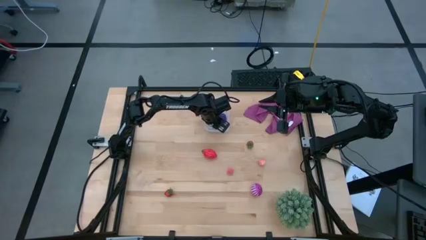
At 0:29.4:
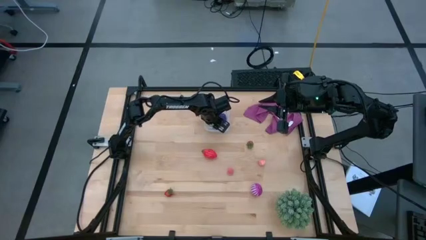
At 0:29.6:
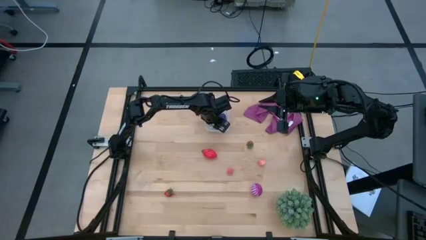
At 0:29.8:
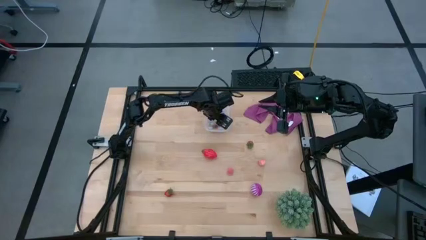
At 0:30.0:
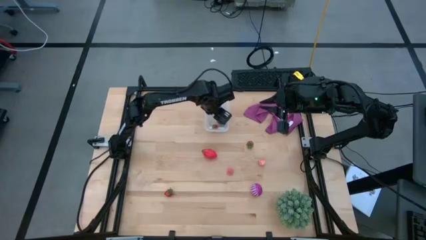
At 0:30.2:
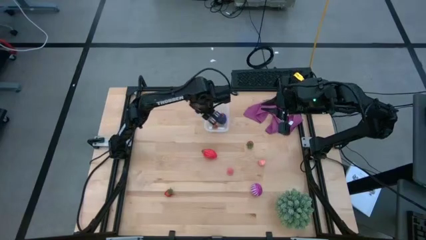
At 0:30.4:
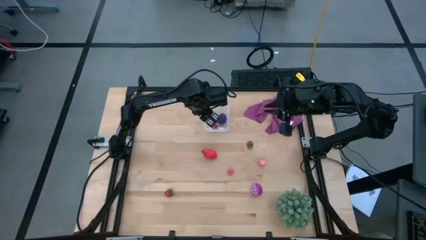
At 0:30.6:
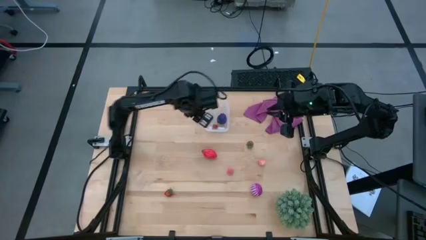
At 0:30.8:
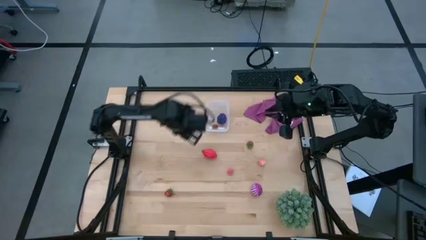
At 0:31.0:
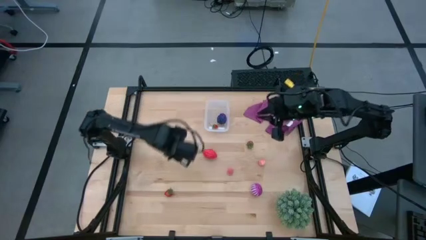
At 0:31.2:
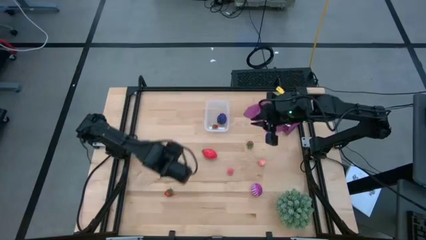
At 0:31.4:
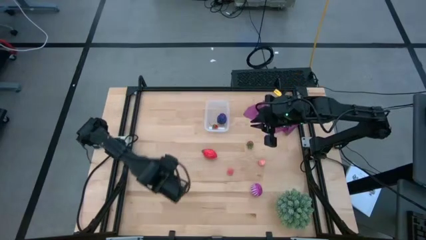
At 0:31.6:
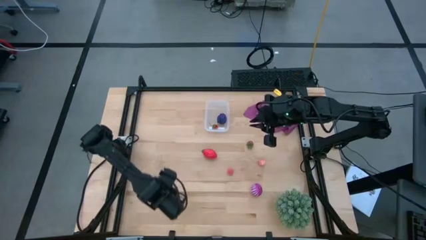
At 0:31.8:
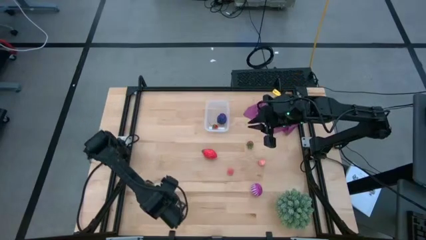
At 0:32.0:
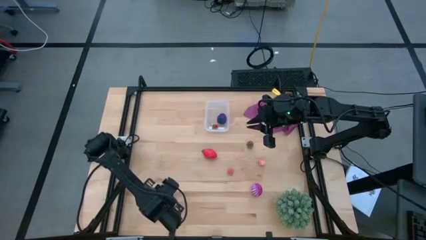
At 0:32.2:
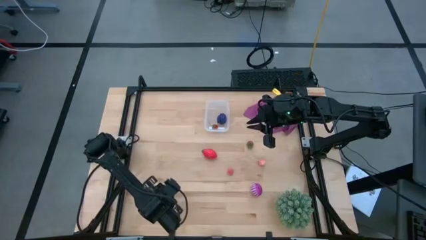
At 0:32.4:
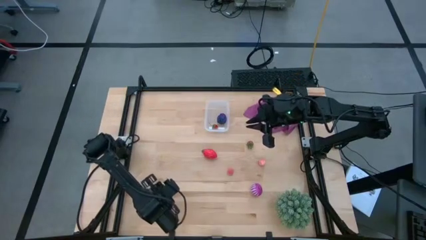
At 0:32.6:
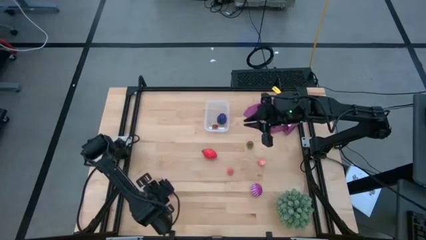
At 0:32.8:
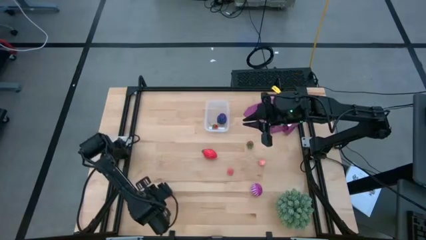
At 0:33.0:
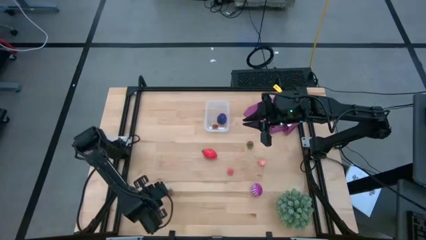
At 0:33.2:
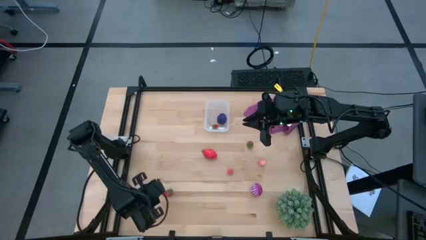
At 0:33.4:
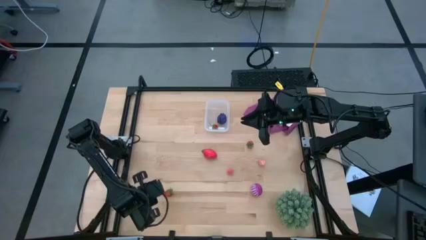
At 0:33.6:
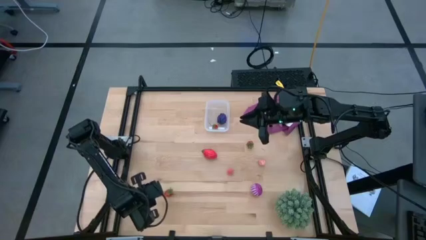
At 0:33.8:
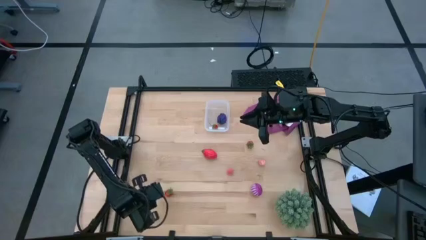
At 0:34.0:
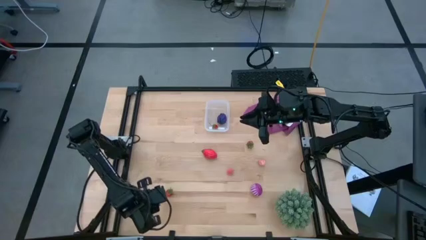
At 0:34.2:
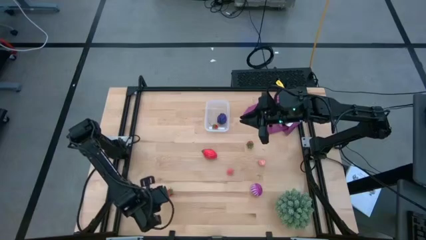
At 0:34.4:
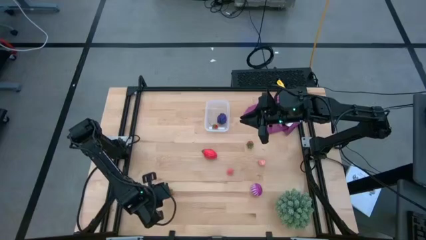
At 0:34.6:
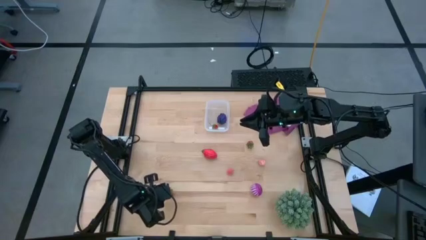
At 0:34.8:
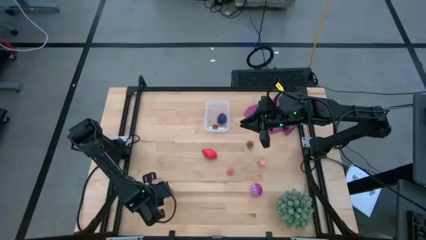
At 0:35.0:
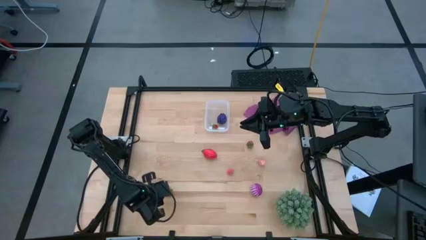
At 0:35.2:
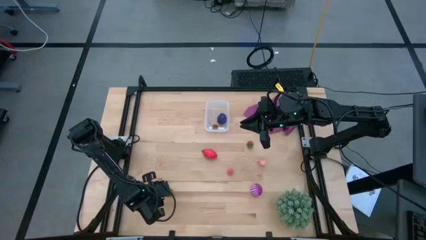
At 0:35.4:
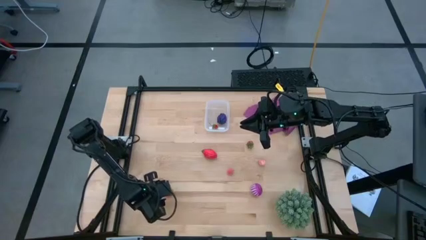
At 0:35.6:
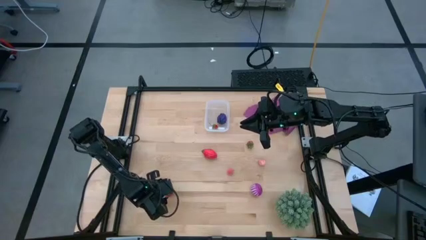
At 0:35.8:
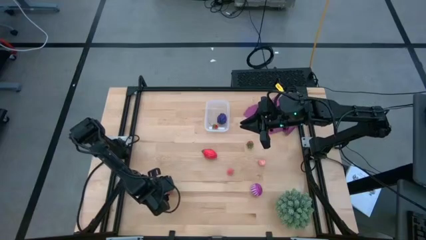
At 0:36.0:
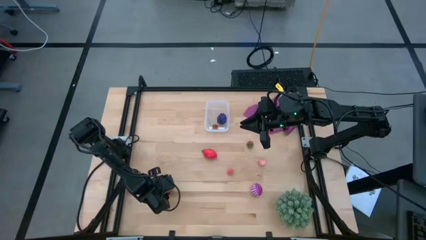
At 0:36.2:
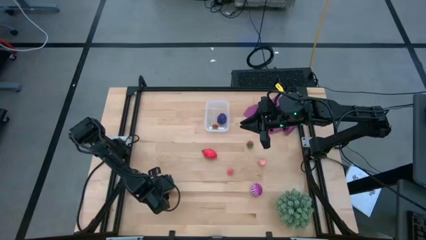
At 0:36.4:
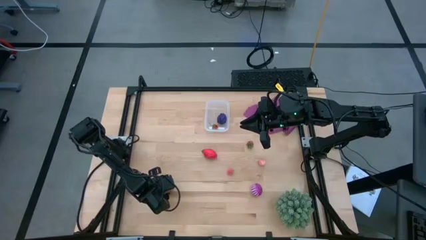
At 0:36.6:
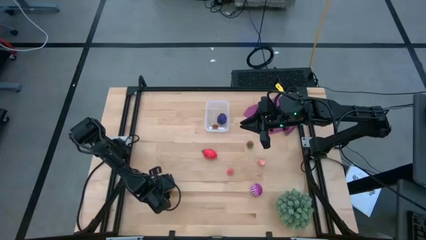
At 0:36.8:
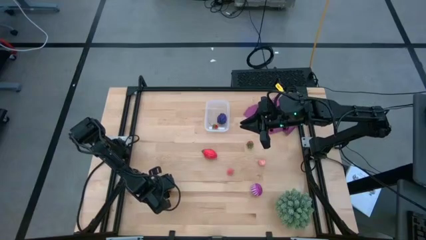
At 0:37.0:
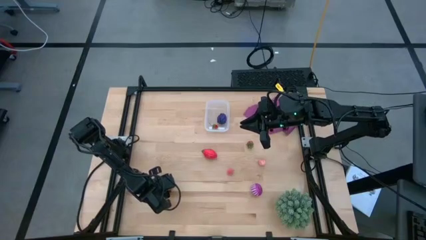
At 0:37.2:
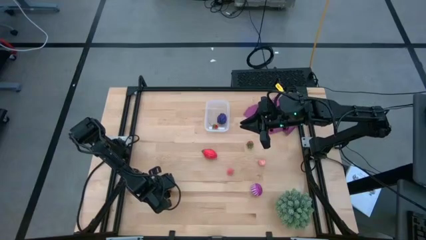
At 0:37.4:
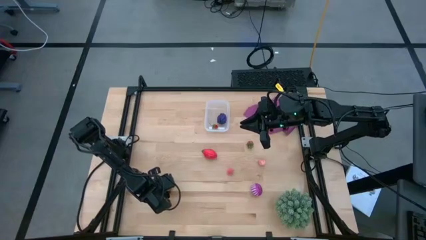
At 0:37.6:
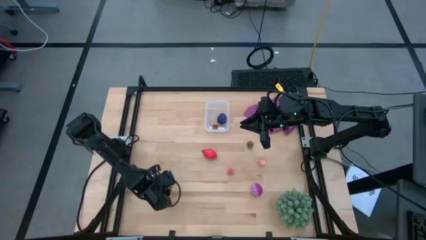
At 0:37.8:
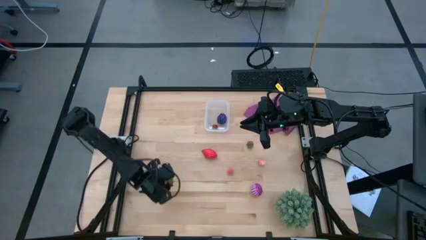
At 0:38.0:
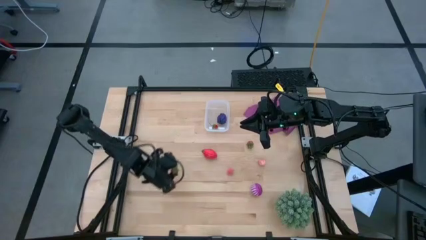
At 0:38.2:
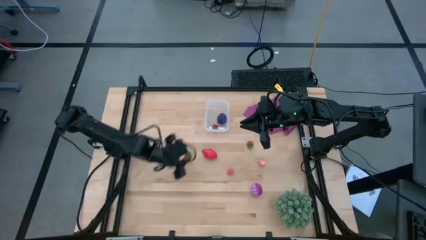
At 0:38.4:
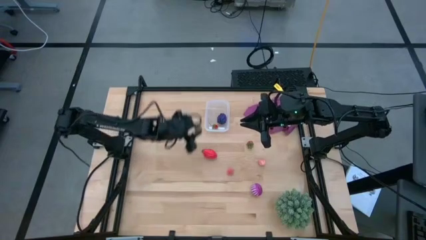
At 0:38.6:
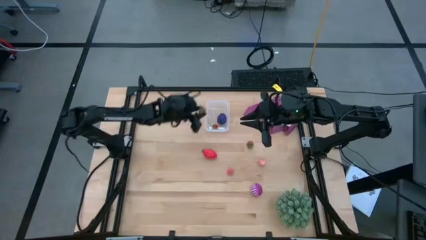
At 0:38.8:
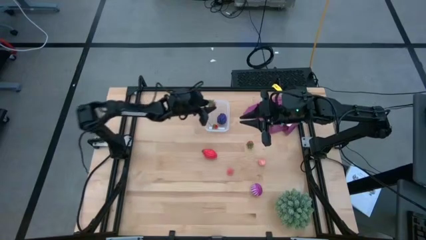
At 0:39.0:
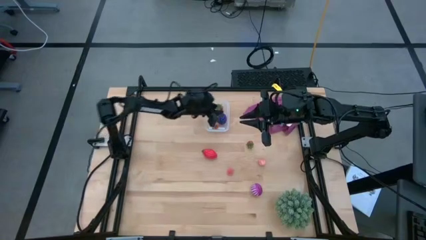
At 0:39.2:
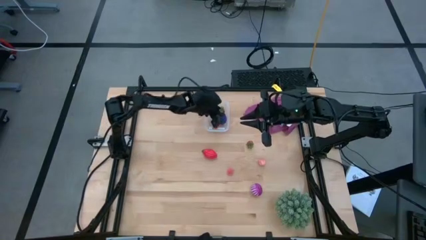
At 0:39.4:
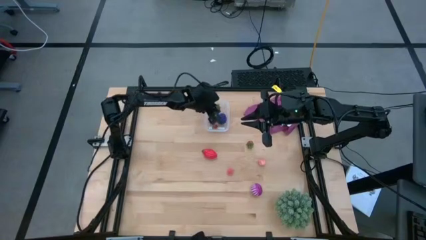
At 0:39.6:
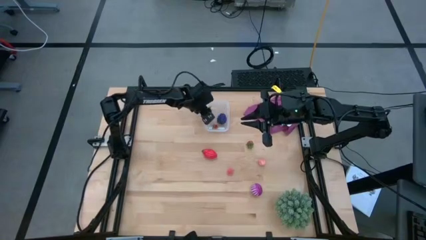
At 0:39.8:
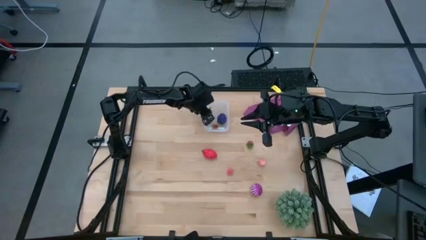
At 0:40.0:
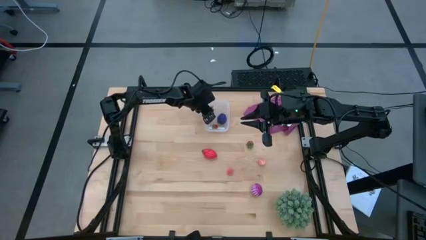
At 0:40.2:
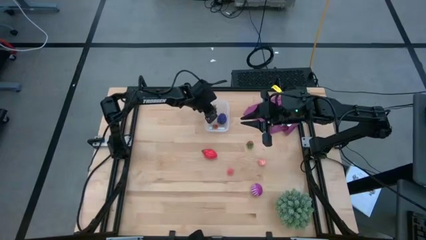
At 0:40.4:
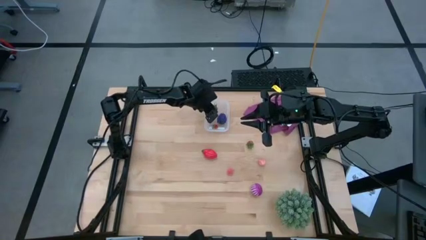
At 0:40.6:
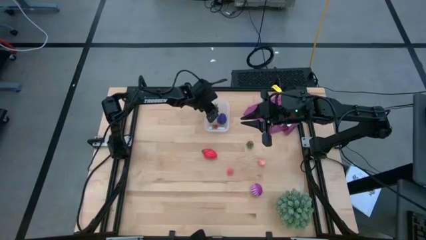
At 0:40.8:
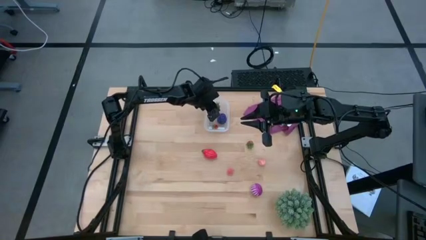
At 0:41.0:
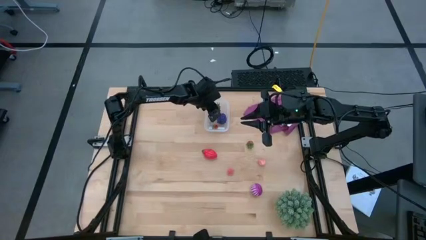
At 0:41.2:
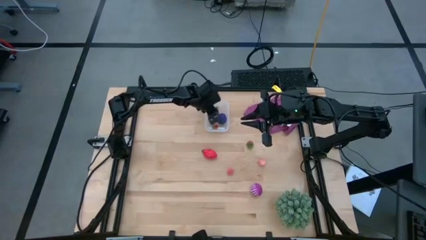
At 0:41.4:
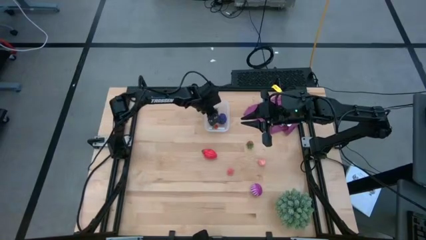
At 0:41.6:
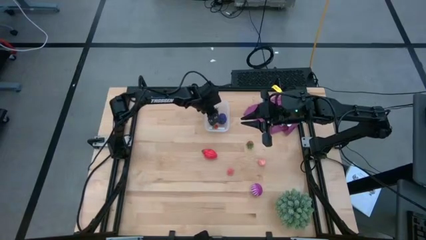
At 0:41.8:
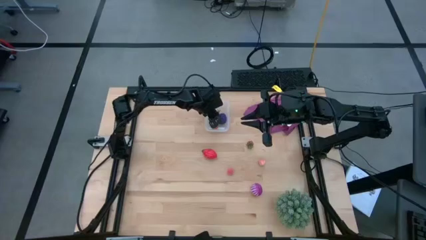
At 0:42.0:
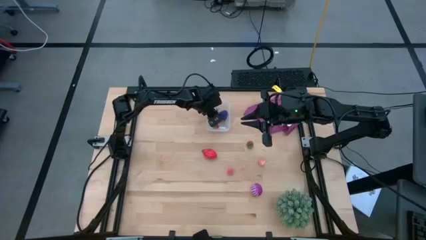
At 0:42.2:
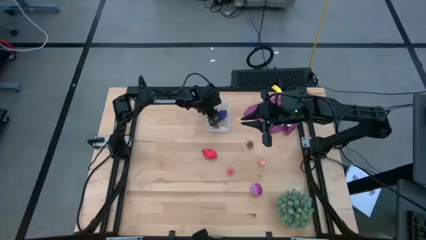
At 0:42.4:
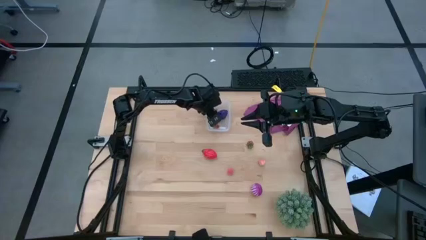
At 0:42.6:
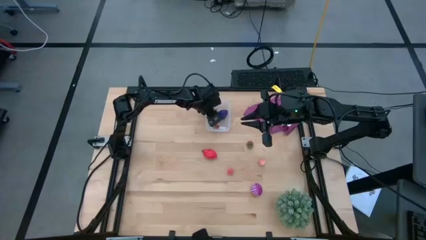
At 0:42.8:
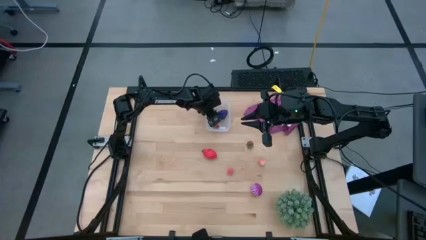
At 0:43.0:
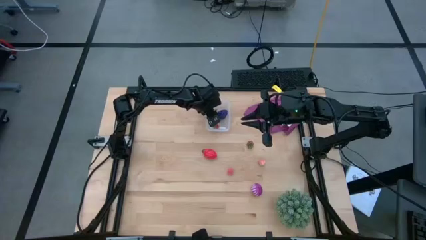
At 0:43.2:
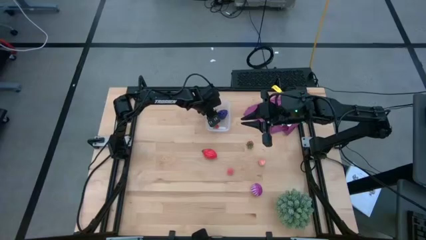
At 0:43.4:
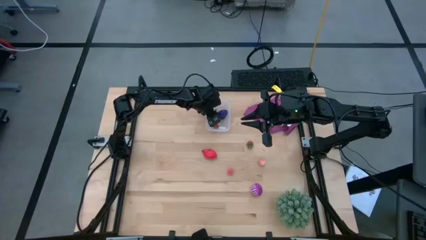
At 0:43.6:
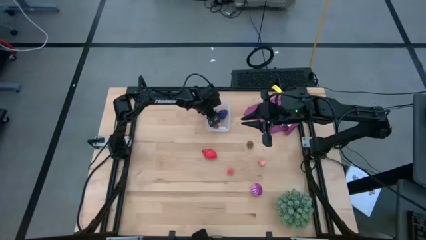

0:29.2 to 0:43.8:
Task: Pick and placing Produce into tupperware
Put the bottom red strawberry into the transparent bin

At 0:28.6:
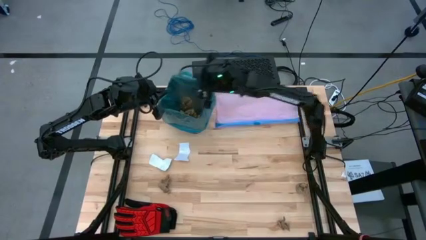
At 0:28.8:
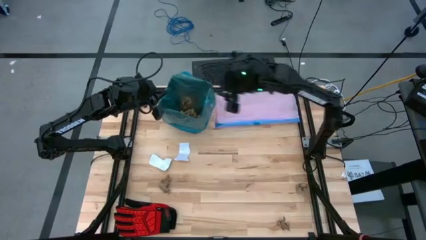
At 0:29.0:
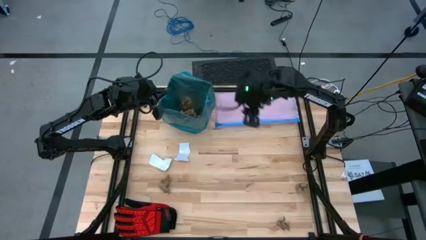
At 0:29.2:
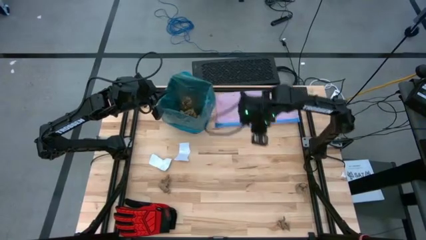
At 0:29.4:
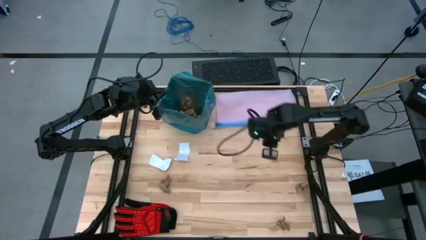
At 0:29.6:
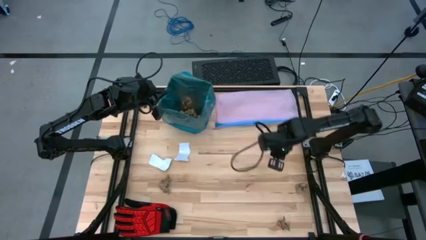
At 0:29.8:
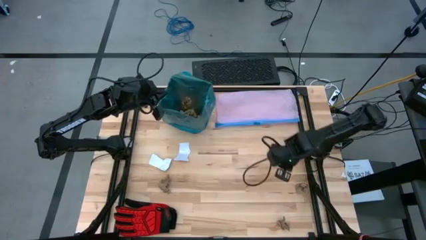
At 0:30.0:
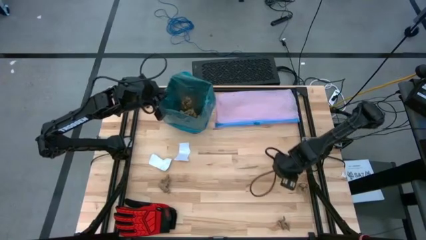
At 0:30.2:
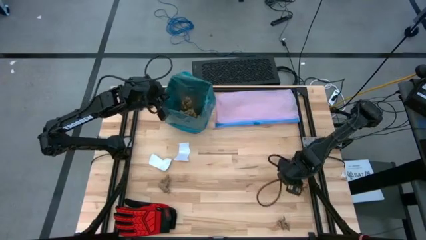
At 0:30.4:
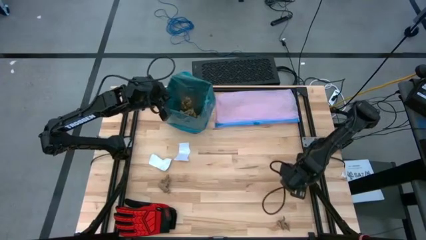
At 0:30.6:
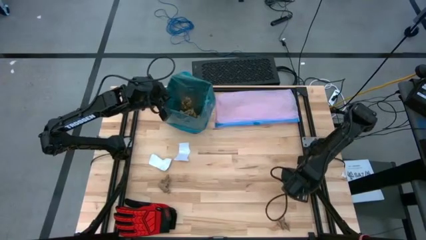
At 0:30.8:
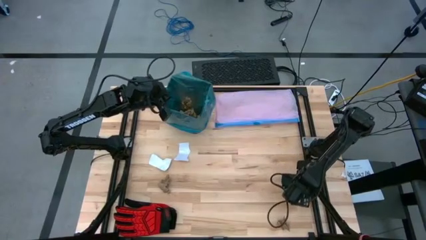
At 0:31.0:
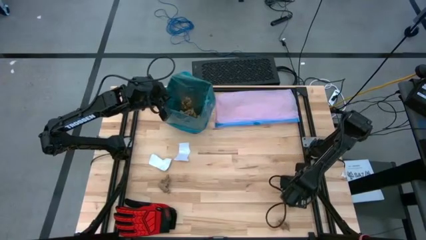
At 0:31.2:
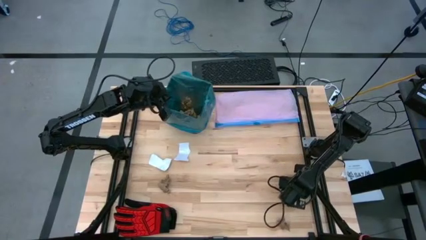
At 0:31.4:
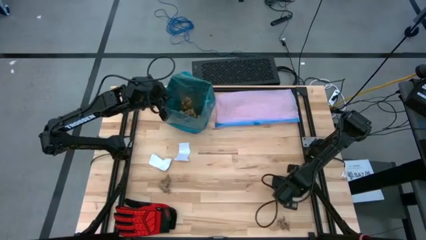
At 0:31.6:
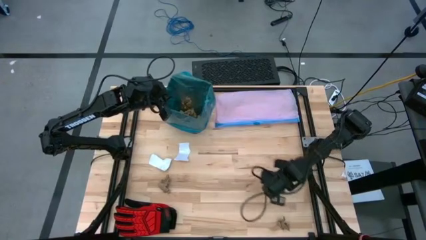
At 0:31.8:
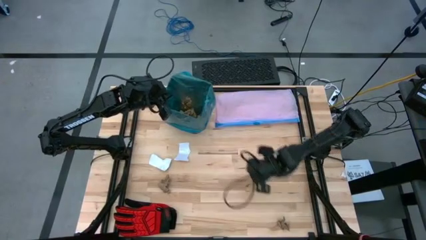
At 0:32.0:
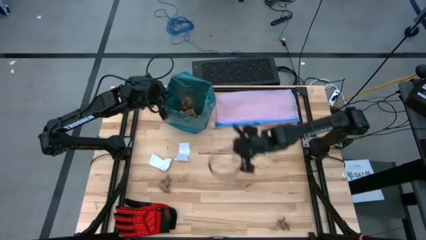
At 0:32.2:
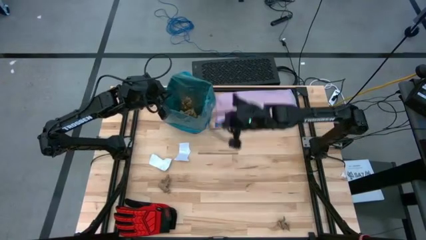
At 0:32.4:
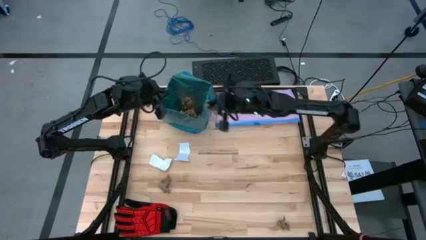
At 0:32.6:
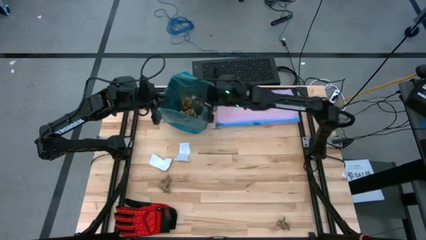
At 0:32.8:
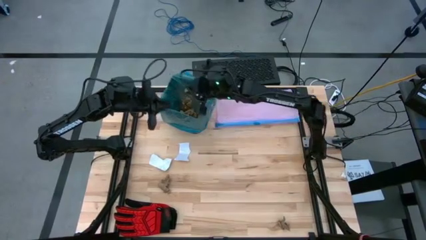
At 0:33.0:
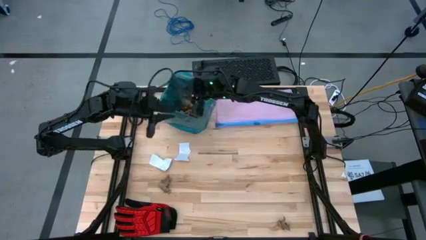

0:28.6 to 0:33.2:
Task: place trash/remove bag and relplace
Put the brown napkin into the trash bin
